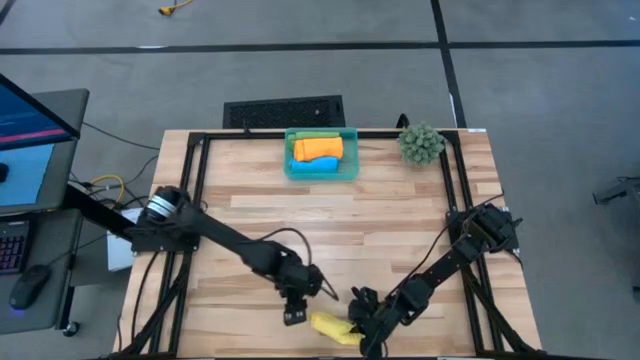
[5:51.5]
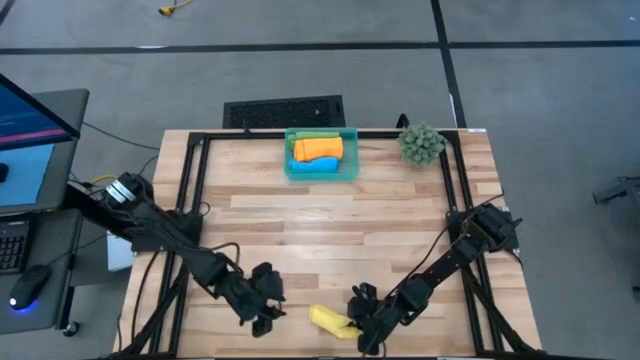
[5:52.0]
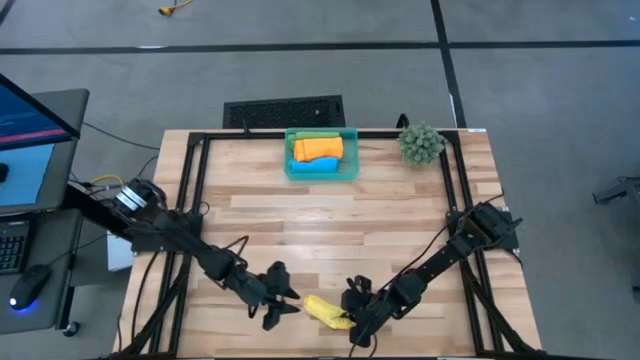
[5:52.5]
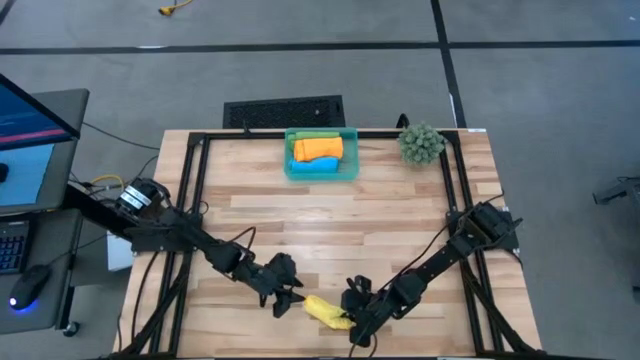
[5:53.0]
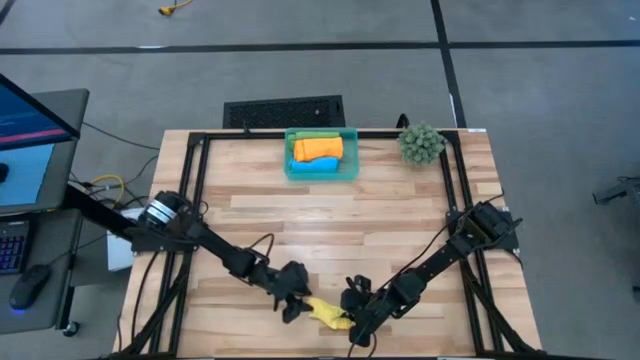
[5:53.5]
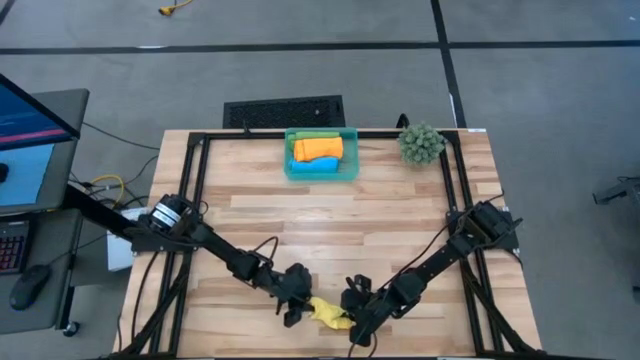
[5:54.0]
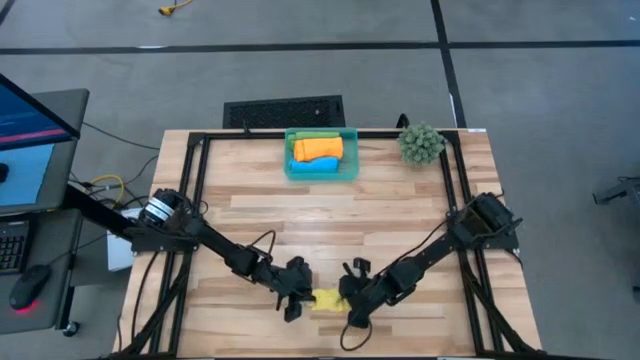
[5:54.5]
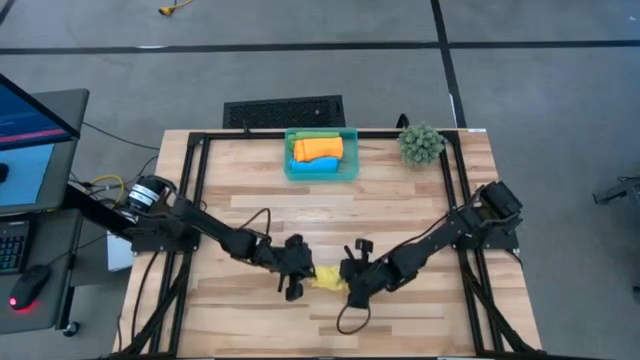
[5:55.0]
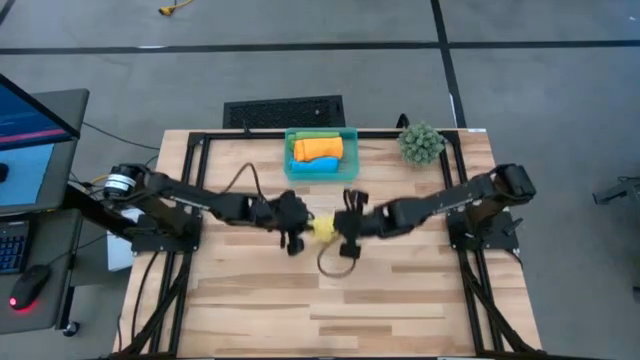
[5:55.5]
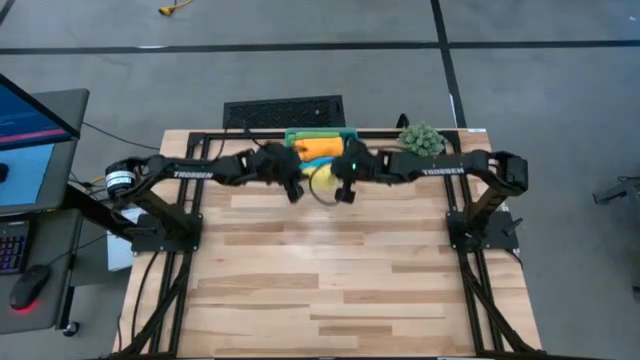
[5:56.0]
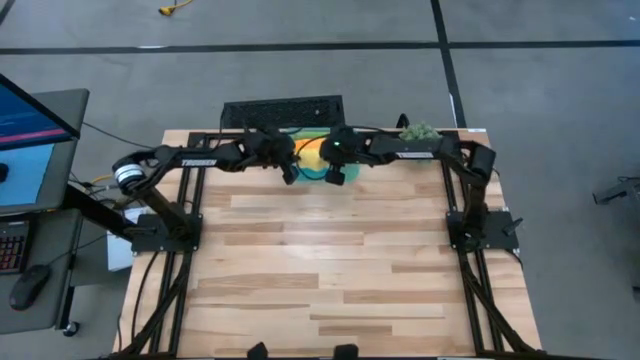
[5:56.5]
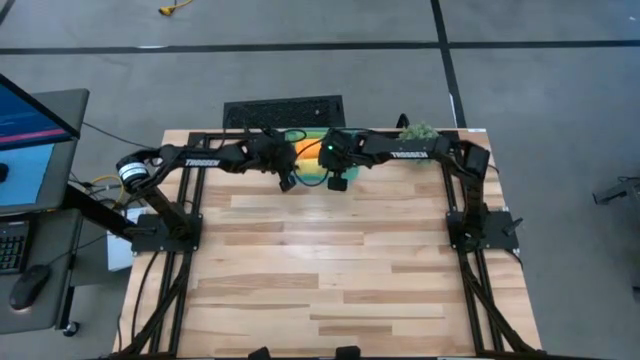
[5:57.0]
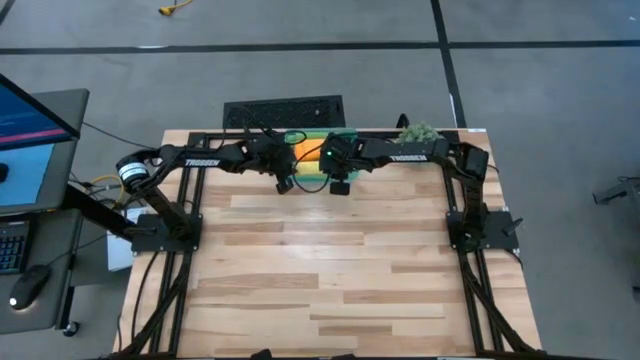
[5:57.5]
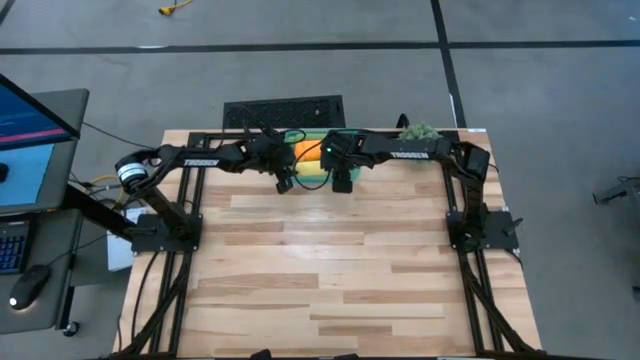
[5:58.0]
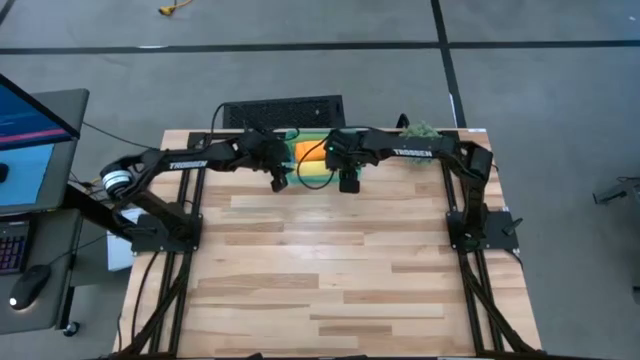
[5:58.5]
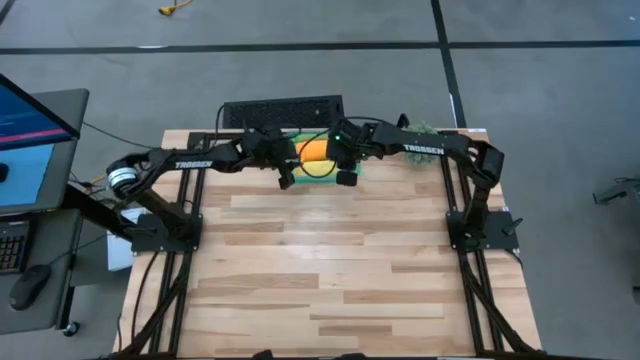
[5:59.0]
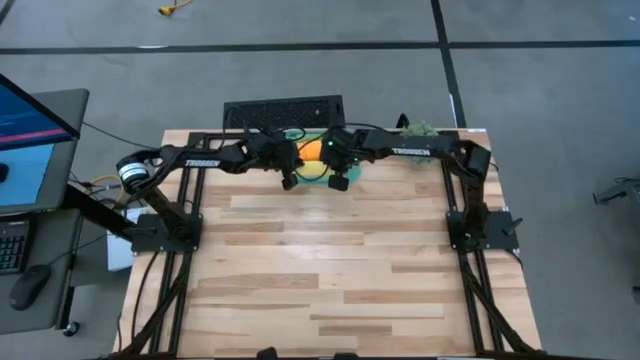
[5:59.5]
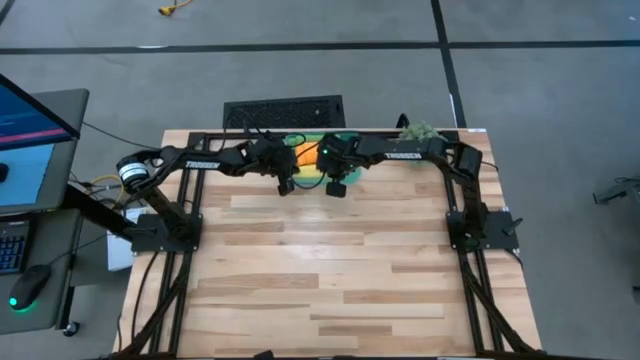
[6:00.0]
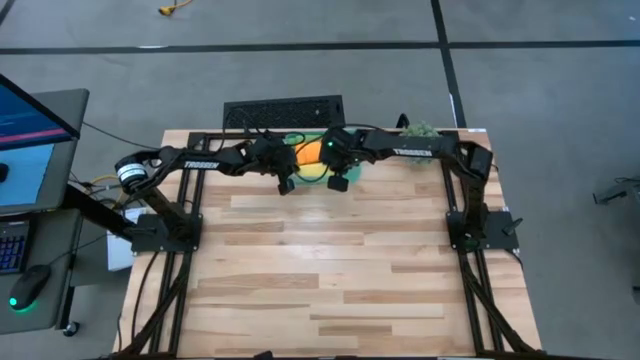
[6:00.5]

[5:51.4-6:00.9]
Task: Roll microfiber towels into tight, uniform cylinder then place into a basket
Put the rolled yellow towel into the green bin

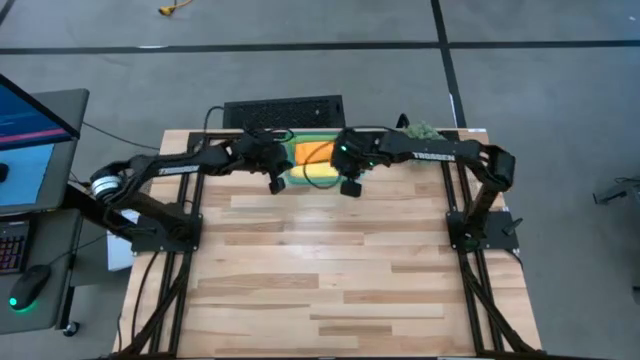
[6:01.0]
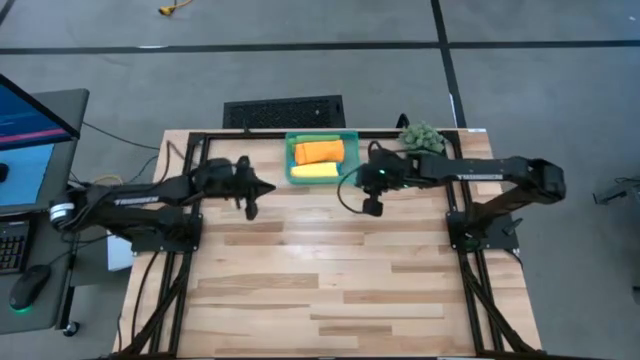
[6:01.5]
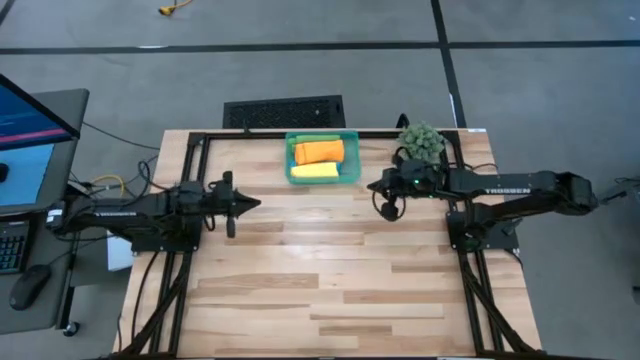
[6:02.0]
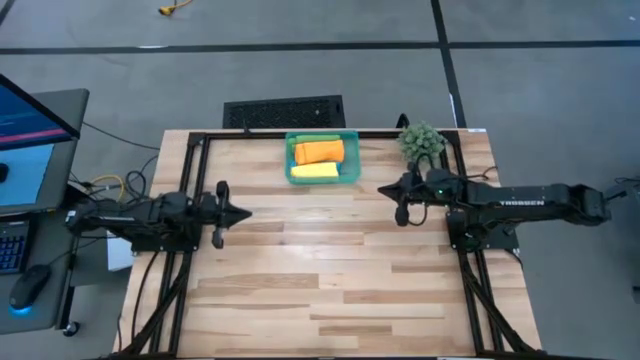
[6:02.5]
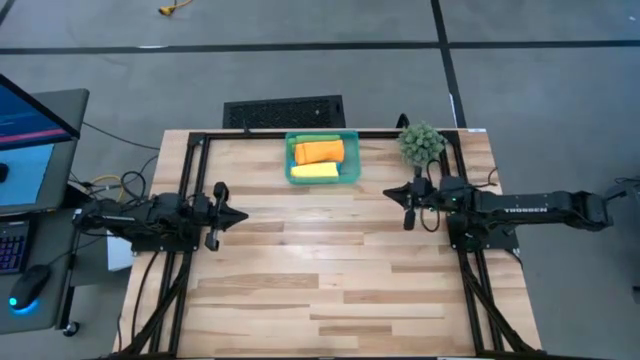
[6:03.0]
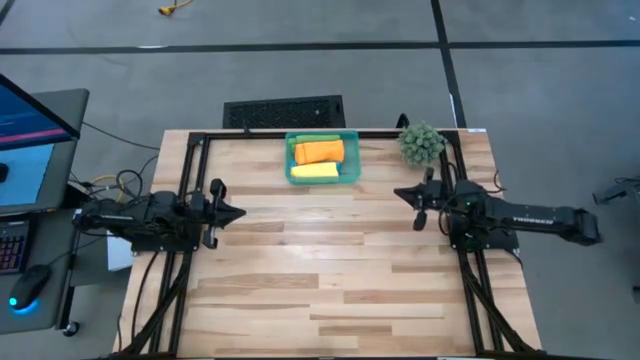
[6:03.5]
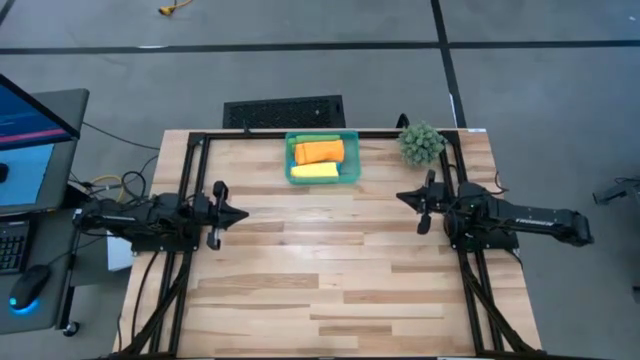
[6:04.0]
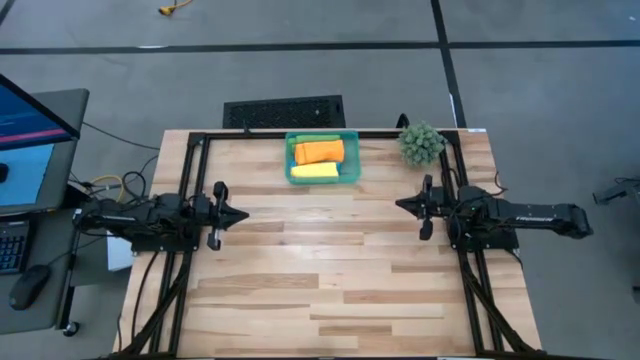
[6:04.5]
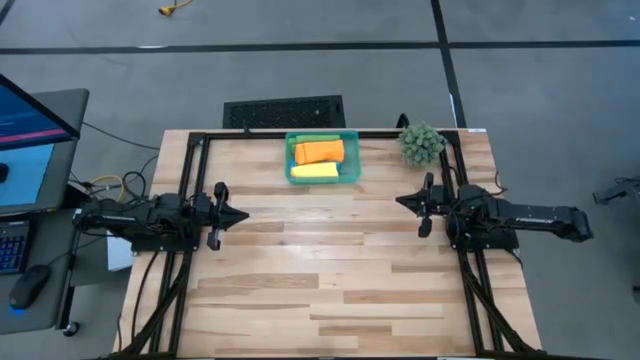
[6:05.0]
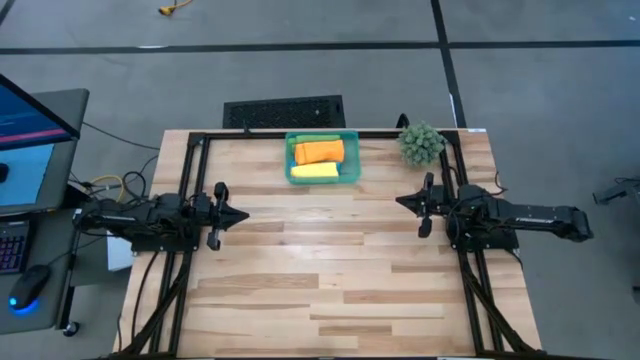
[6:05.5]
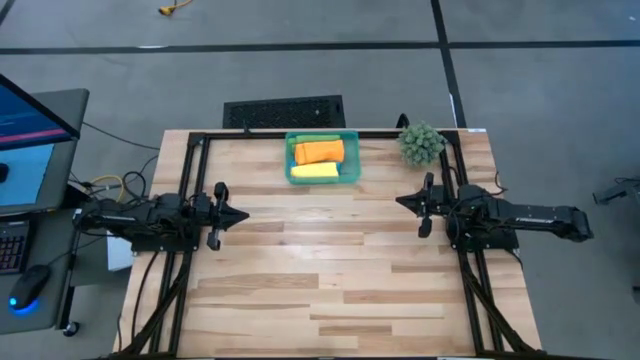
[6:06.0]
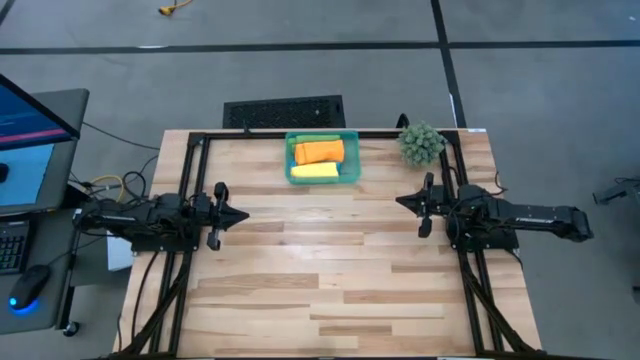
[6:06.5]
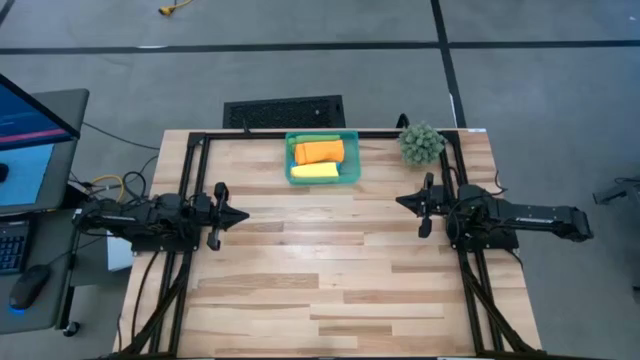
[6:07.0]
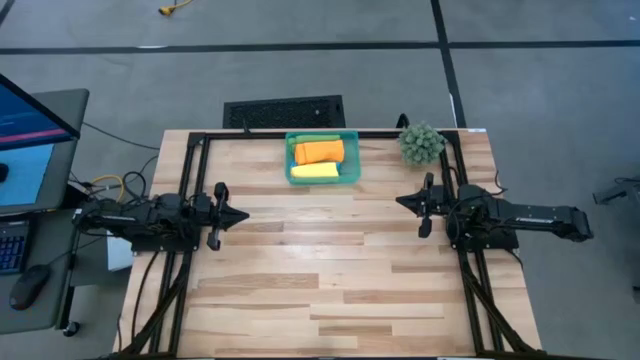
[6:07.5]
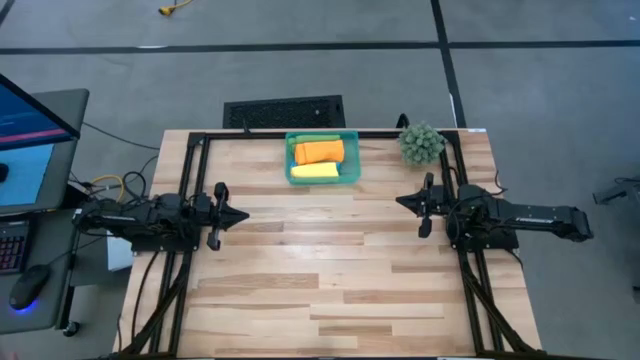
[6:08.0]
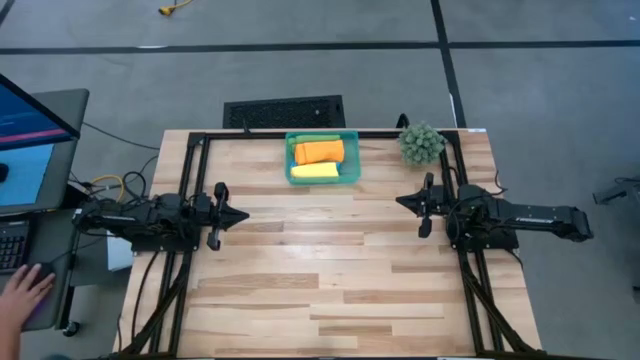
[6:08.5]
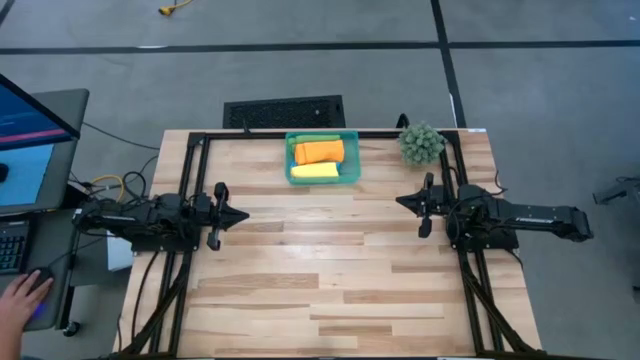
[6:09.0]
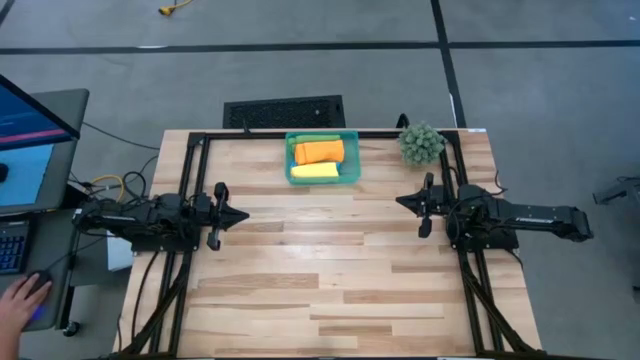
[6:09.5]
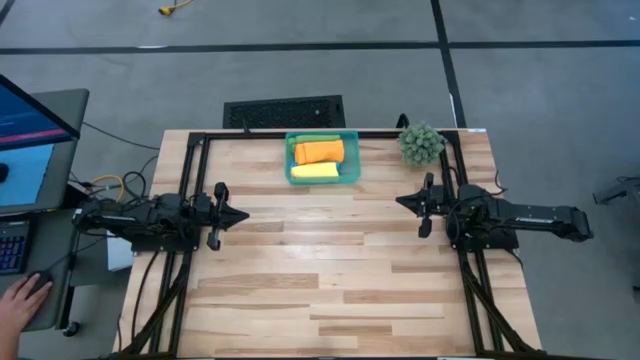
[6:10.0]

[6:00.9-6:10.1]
Return to Home Position

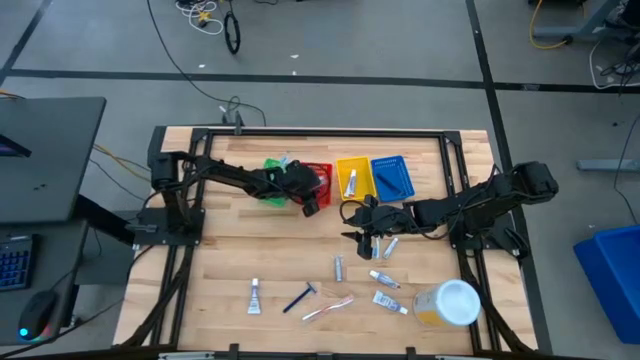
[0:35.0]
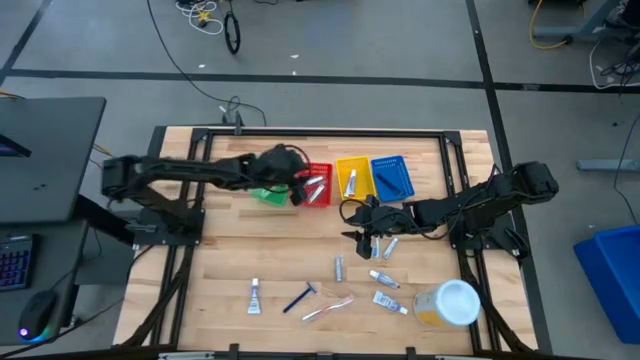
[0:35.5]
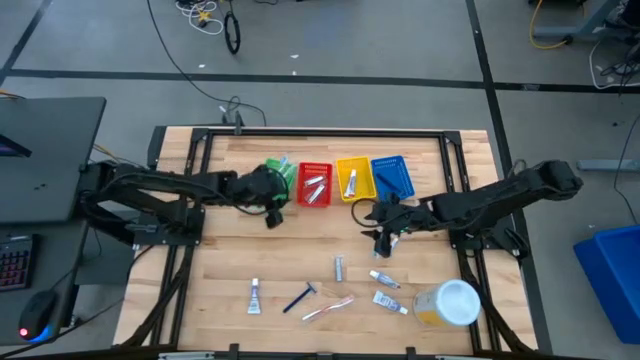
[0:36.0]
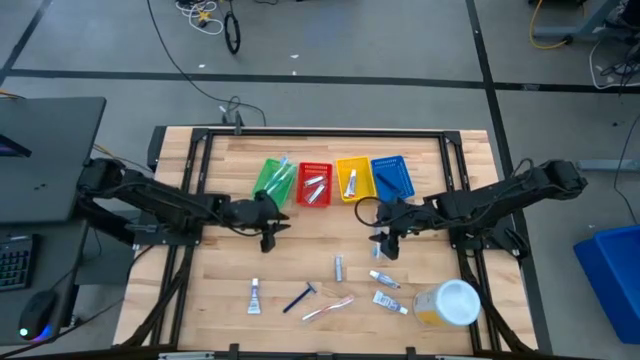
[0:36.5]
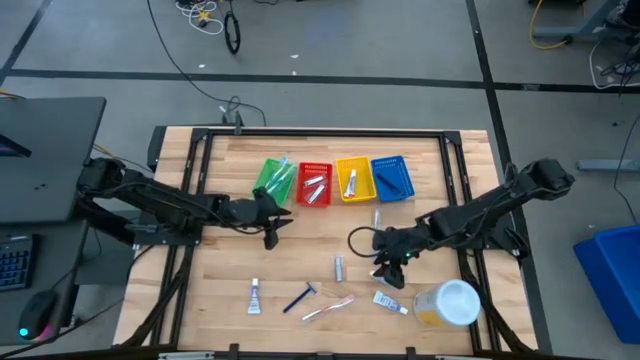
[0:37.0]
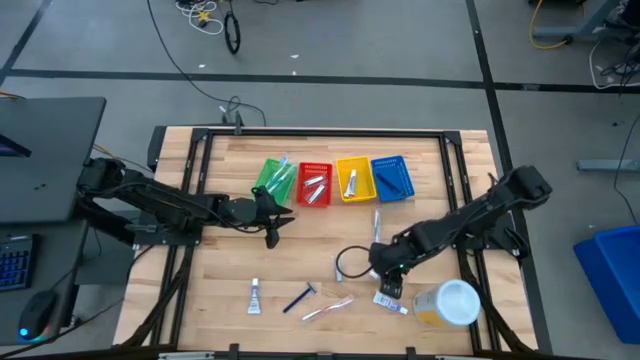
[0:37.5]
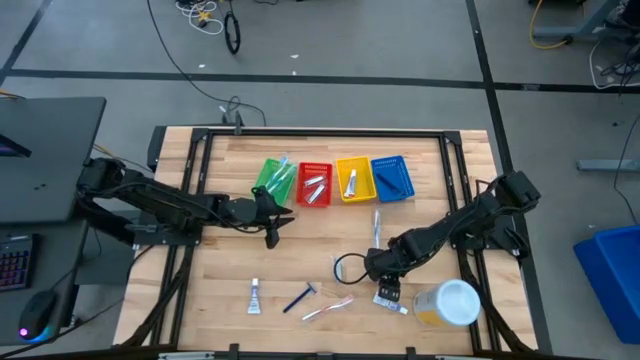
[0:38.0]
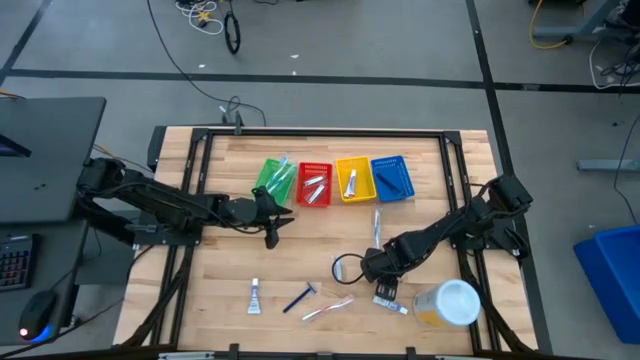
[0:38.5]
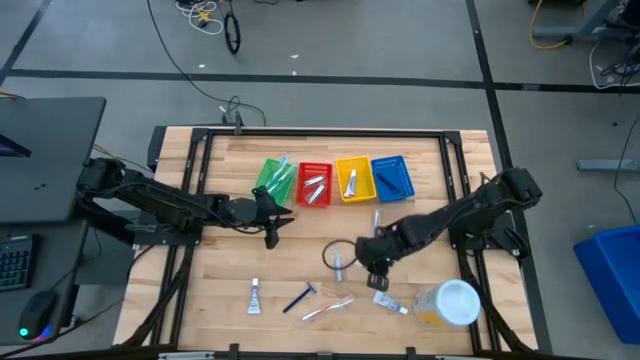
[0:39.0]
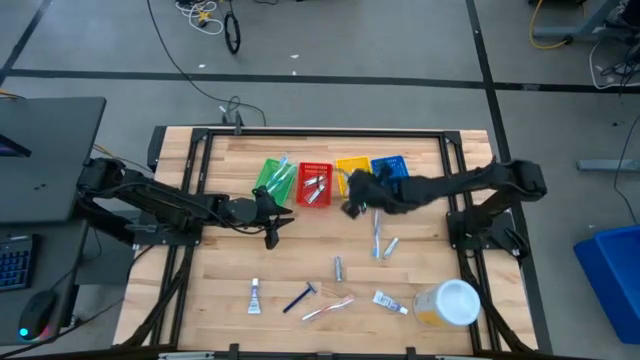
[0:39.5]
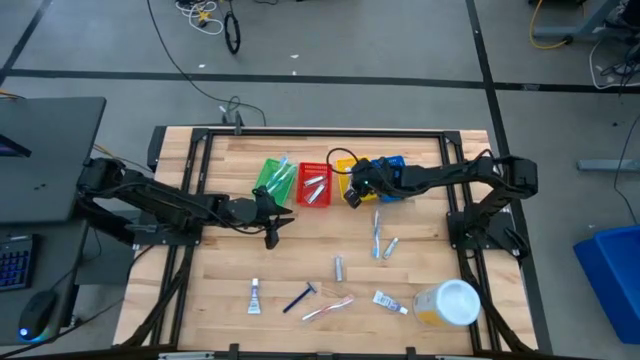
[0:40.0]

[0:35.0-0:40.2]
Task: Pick & Place Travel size toiletries
Put the white toothpaste into the yellow bin
